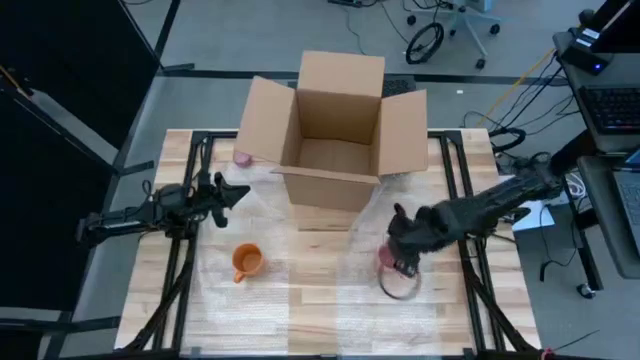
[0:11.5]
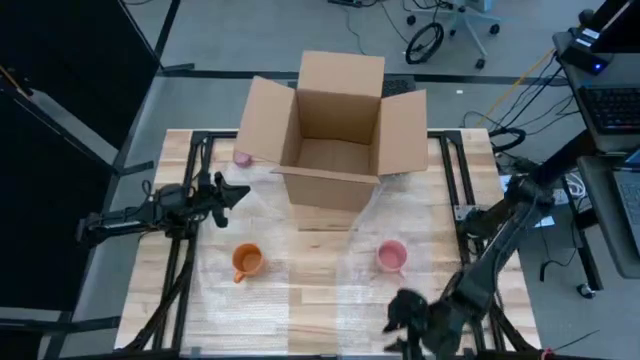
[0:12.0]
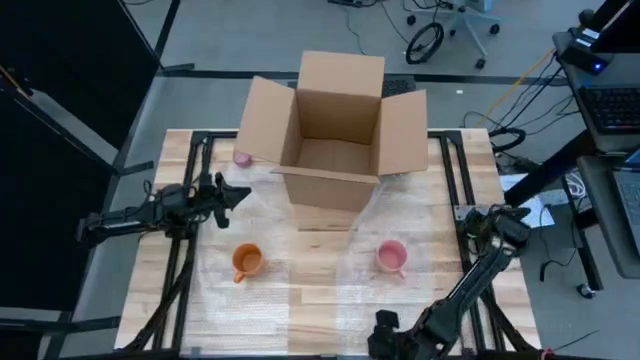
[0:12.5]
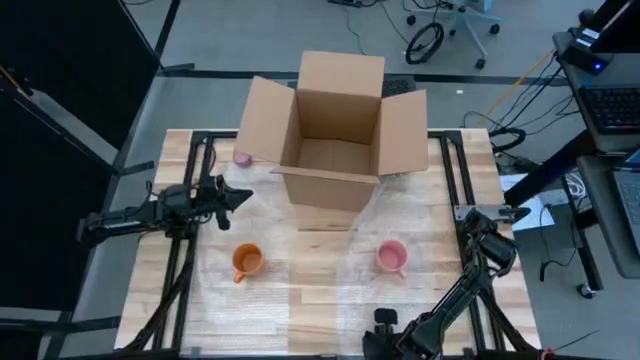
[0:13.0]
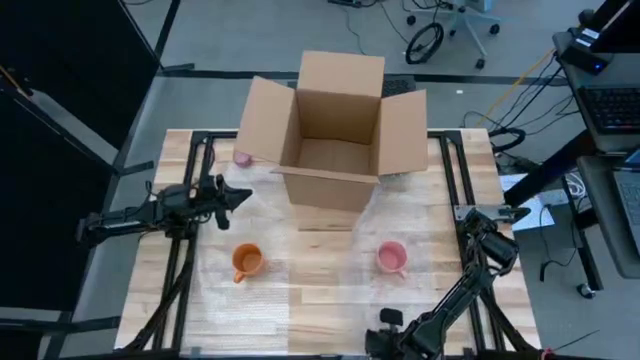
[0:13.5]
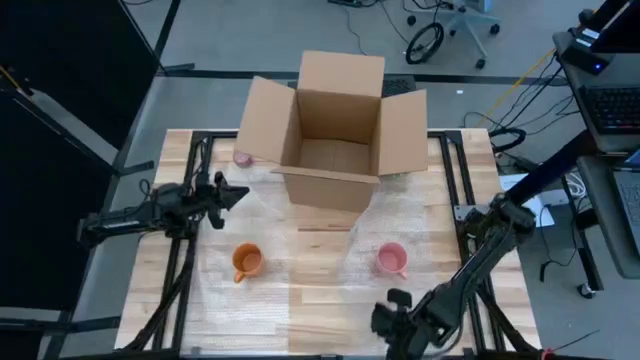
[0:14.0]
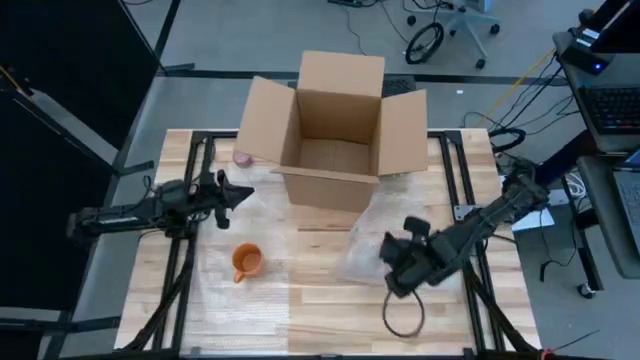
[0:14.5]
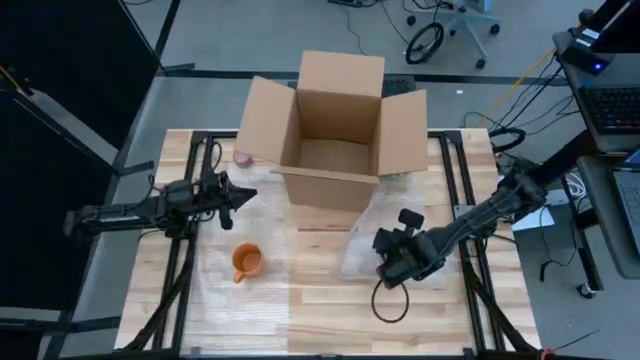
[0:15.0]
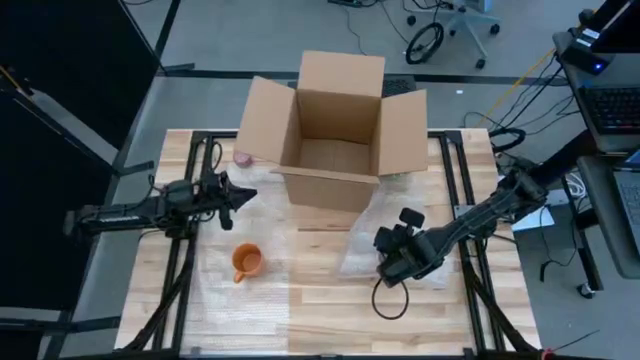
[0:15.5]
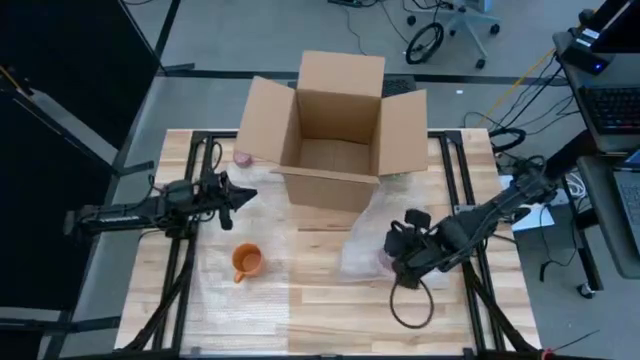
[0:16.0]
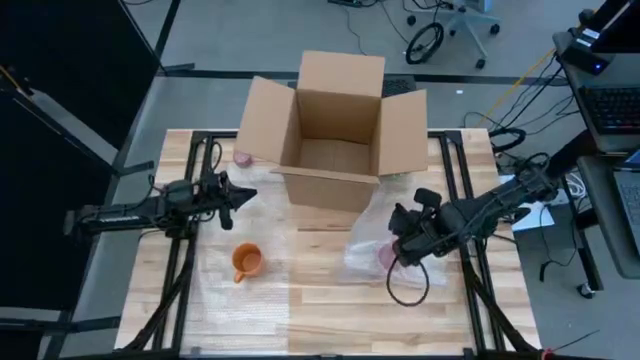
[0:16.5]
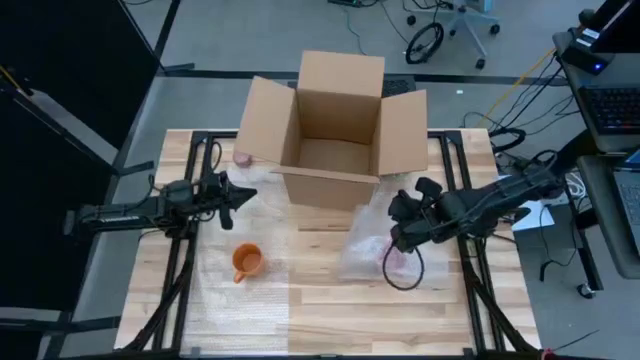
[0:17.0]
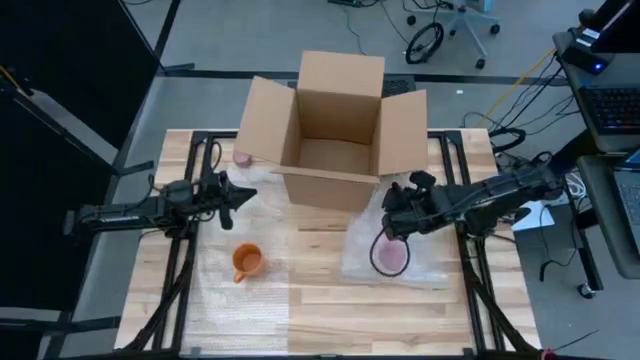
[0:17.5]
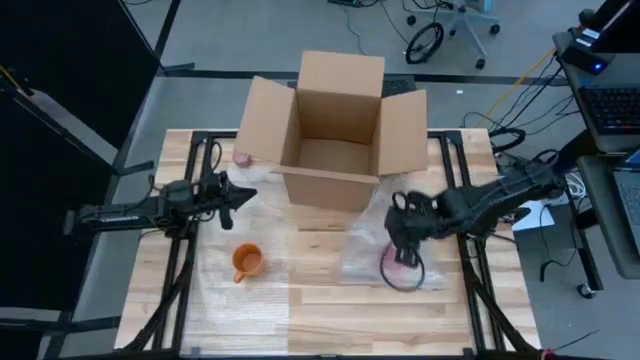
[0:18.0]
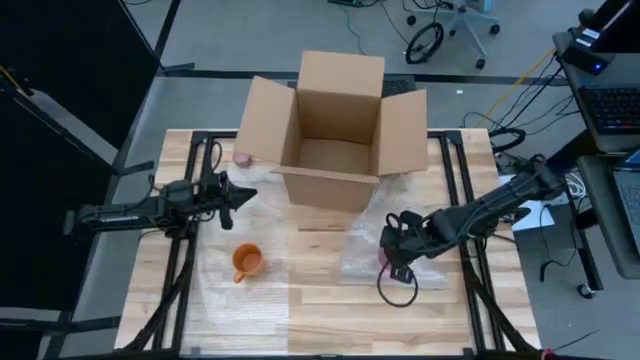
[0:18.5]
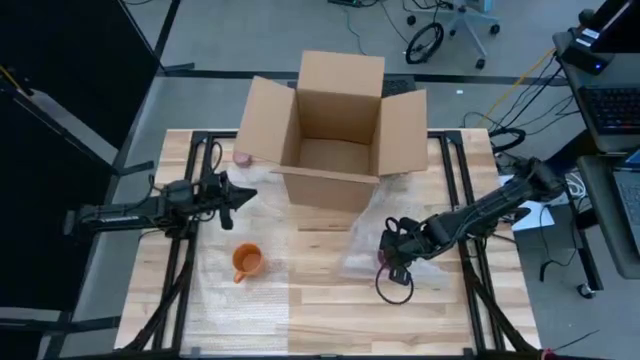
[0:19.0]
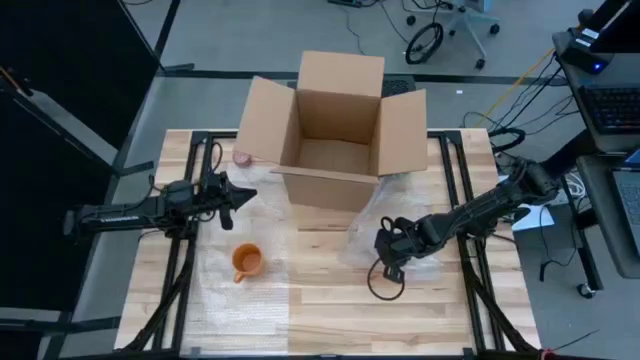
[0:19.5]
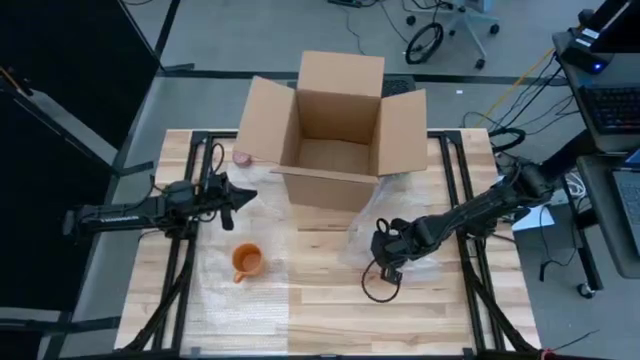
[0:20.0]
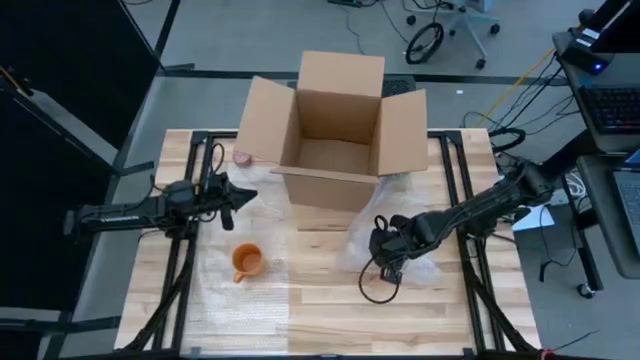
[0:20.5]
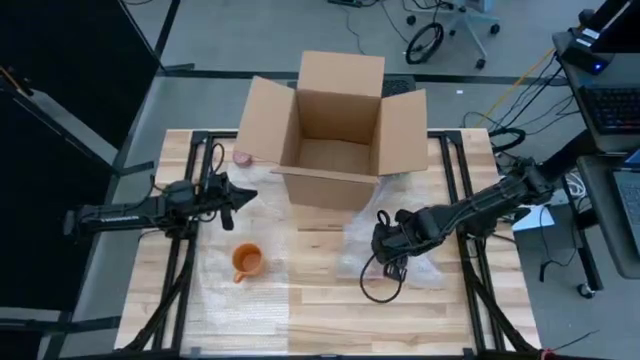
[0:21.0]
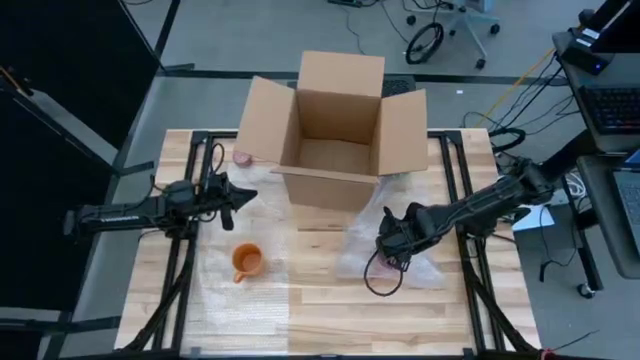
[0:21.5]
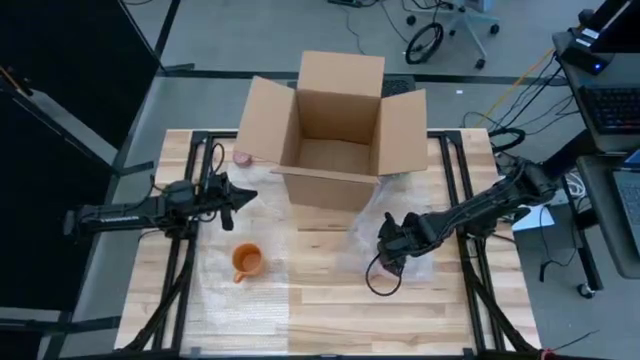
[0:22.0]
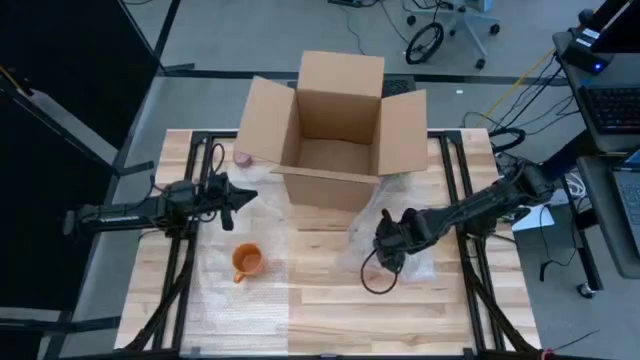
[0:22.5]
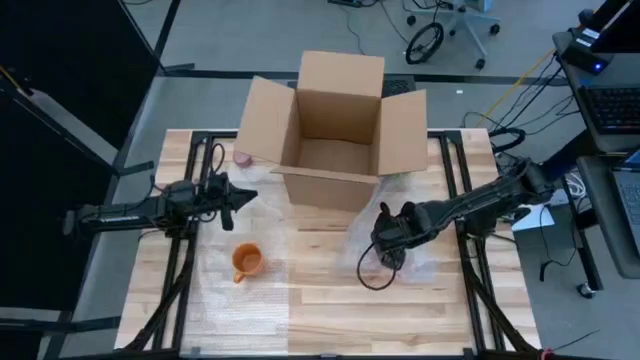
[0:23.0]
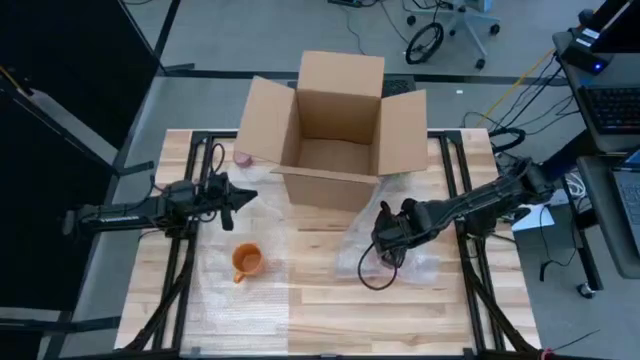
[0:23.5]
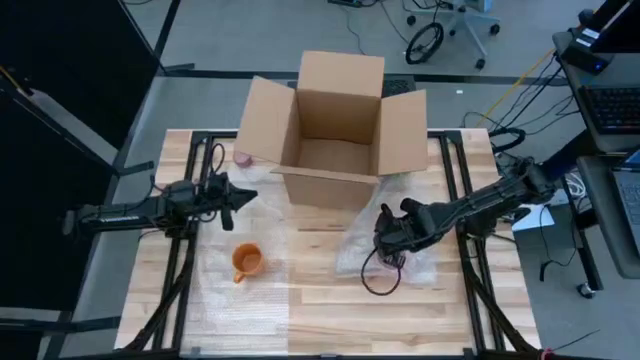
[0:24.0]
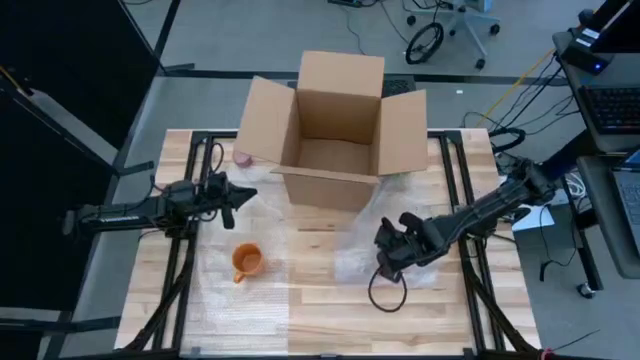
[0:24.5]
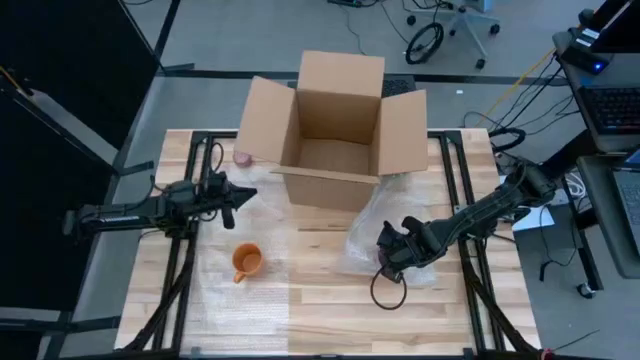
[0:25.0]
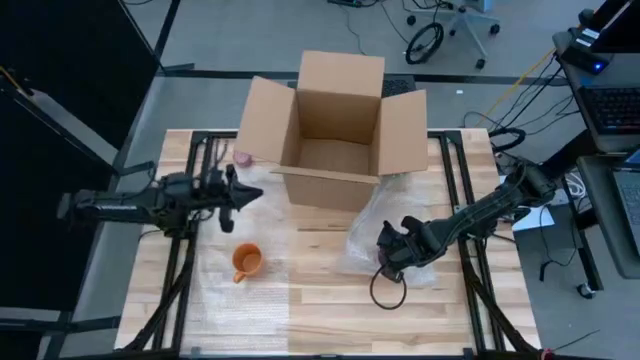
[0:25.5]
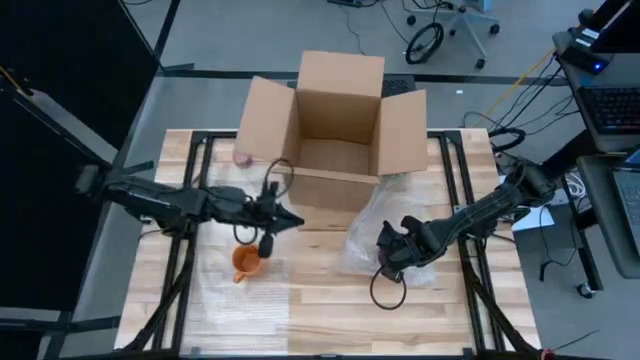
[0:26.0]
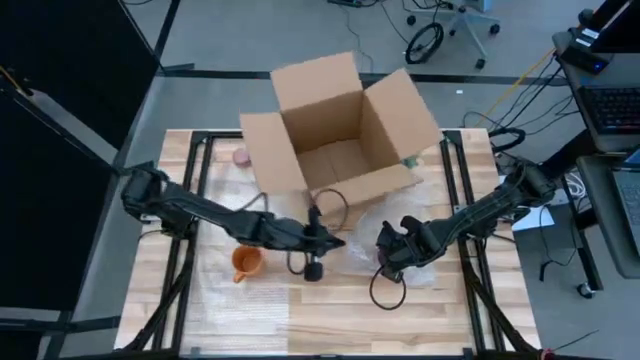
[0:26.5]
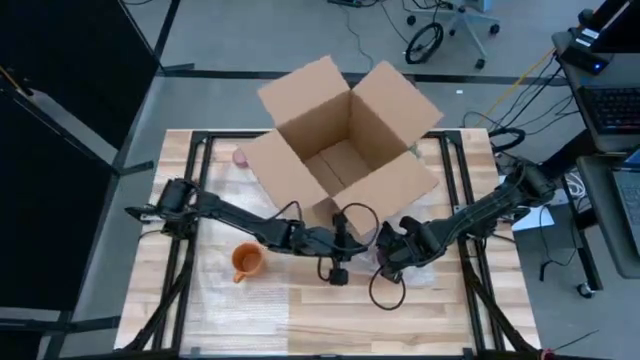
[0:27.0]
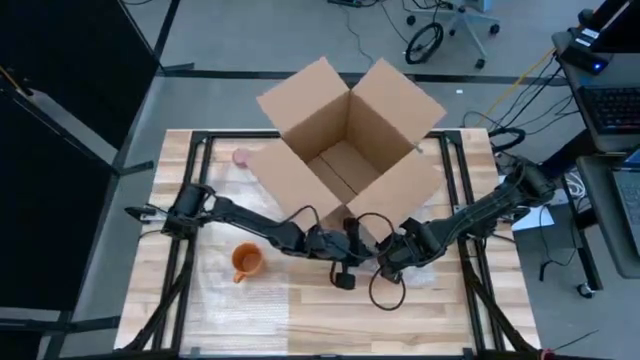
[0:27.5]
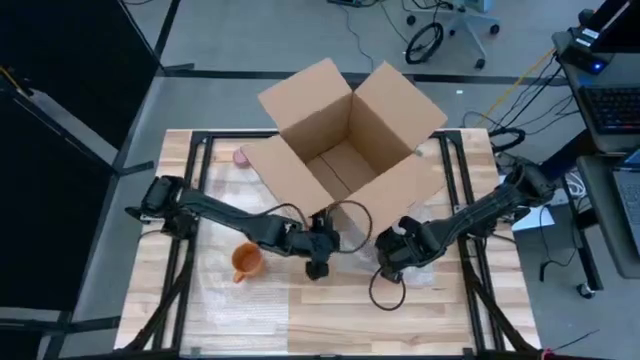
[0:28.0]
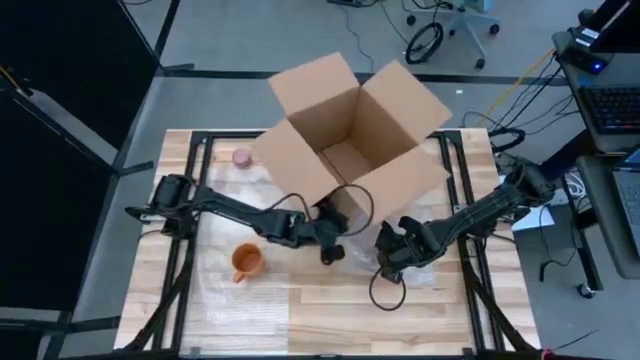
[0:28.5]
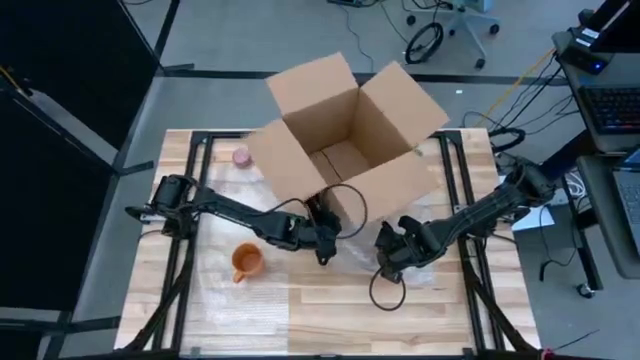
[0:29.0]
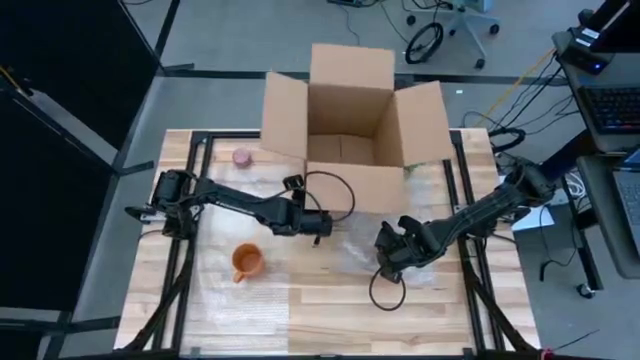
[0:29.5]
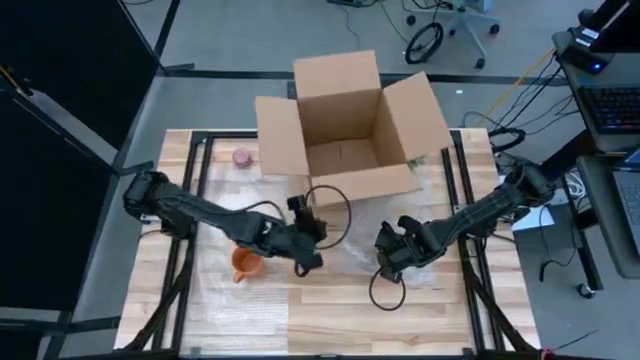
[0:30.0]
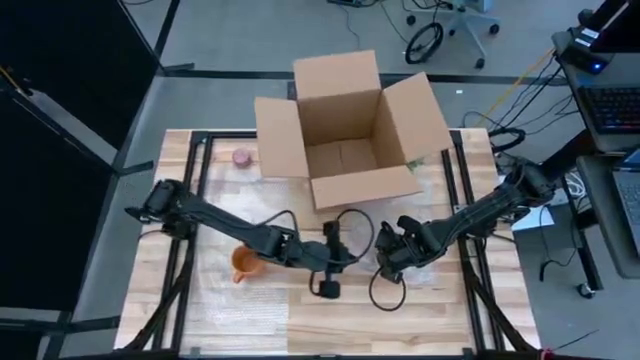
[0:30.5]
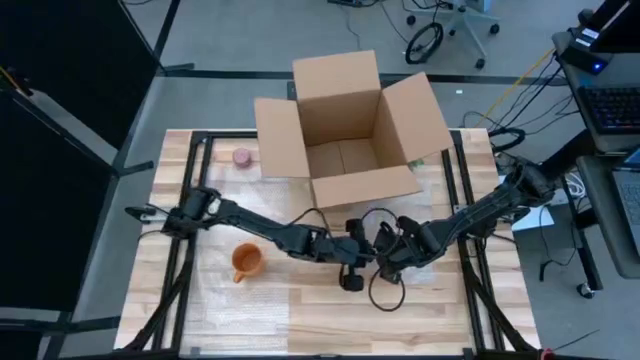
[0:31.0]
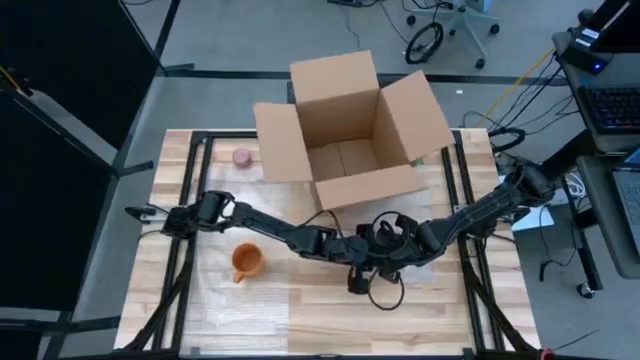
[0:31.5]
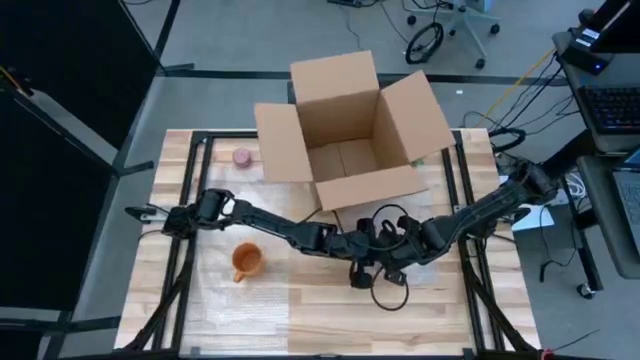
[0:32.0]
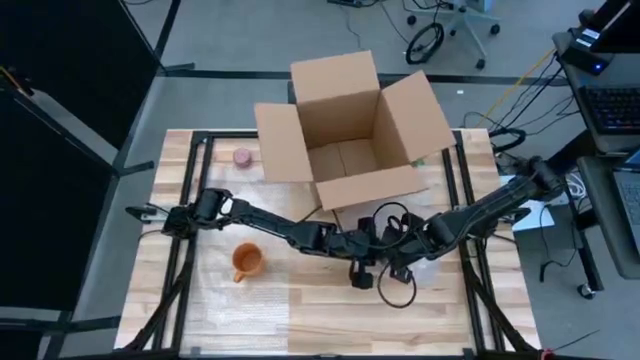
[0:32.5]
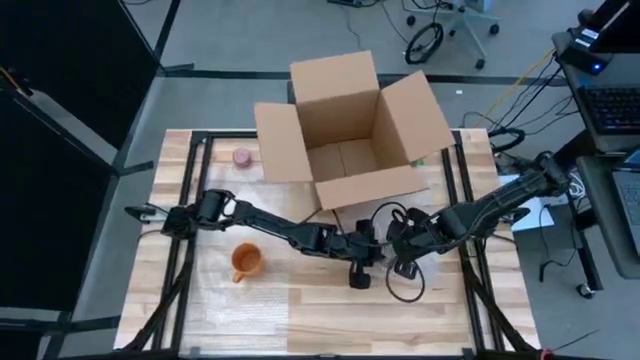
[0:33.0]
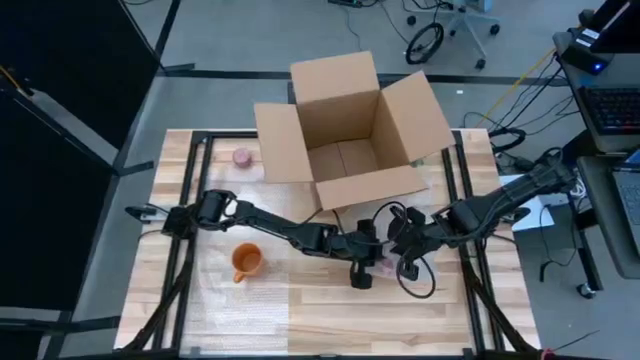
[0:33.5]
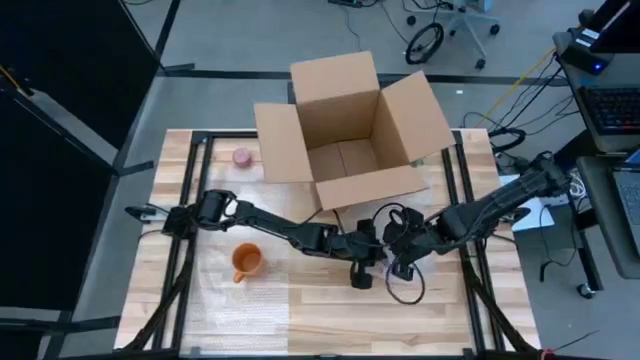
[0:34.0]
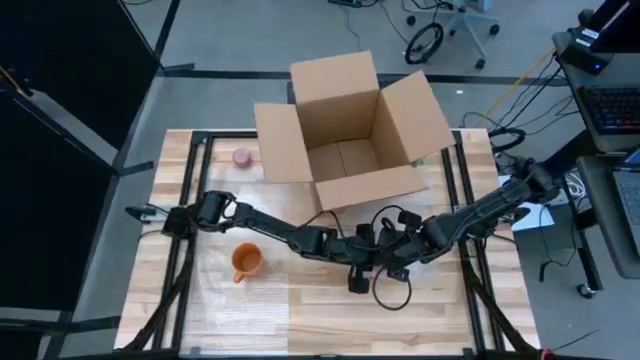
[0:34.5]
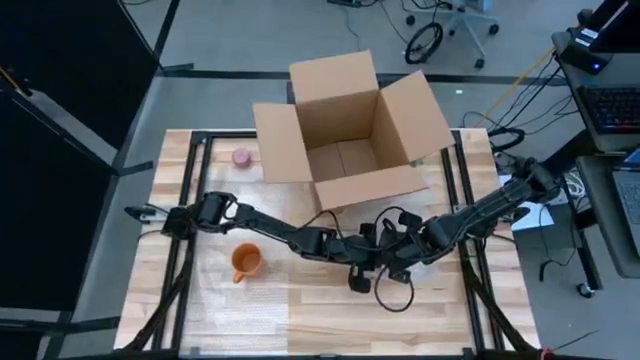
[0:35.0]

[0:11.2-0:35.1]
Task: wrap mug
Wrap the pink cup with the bubble wrap
